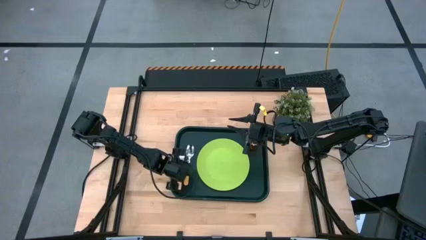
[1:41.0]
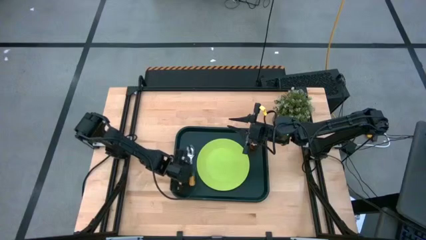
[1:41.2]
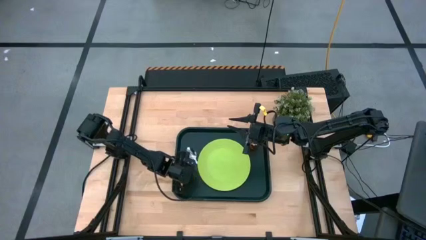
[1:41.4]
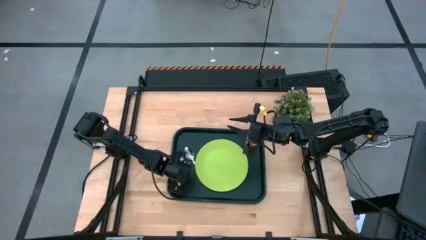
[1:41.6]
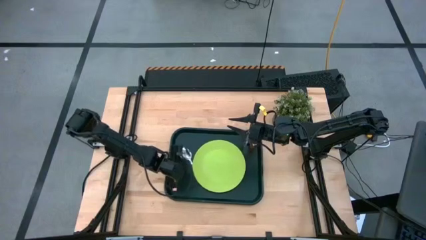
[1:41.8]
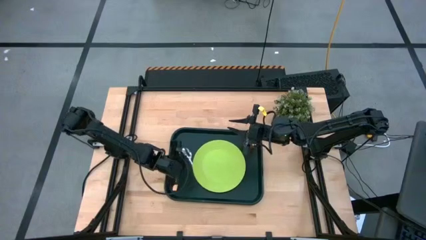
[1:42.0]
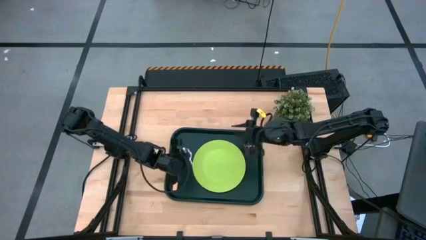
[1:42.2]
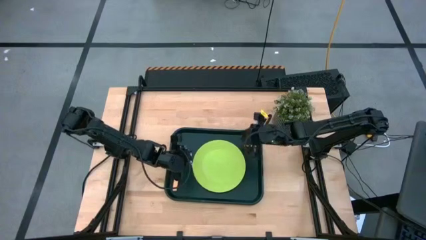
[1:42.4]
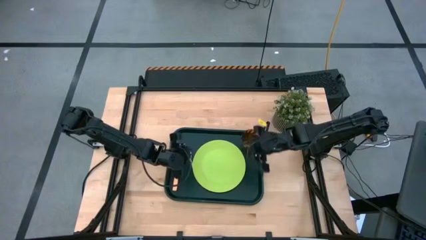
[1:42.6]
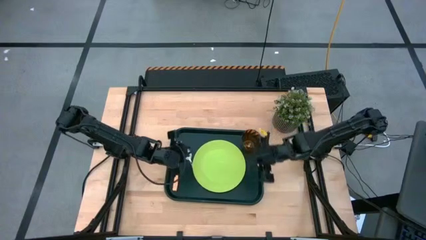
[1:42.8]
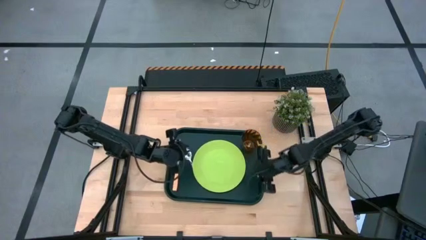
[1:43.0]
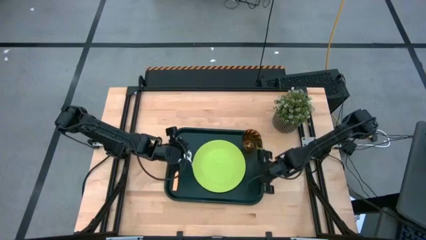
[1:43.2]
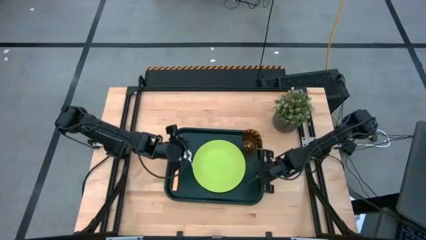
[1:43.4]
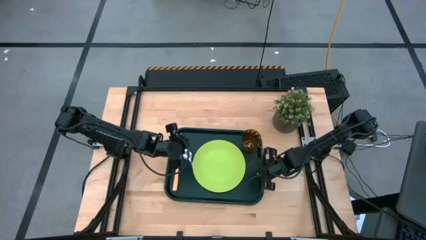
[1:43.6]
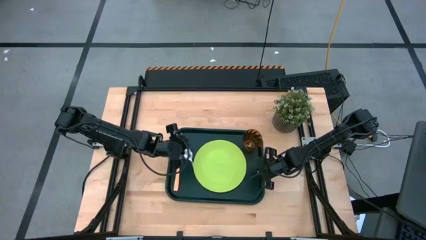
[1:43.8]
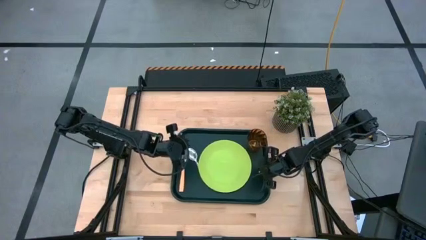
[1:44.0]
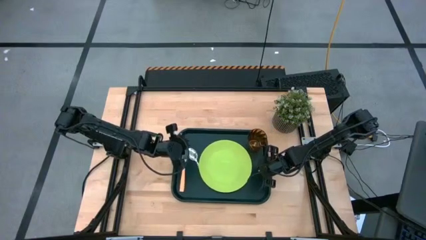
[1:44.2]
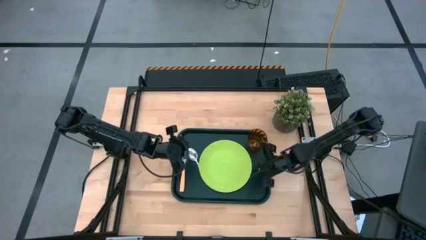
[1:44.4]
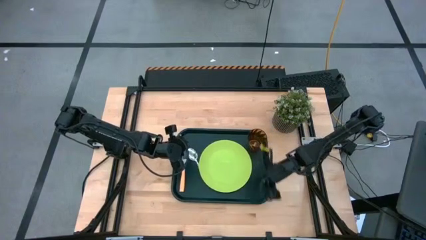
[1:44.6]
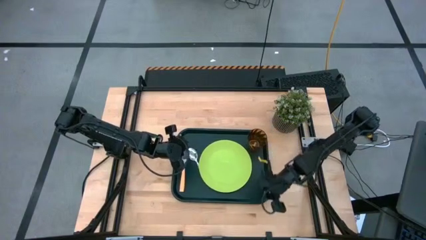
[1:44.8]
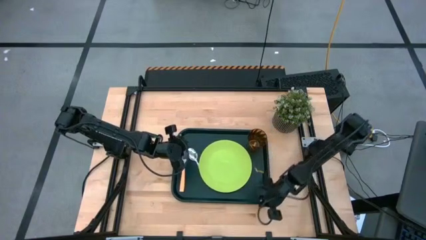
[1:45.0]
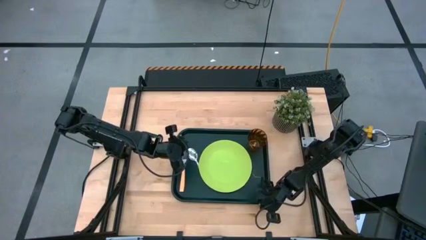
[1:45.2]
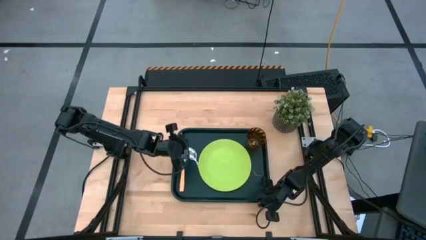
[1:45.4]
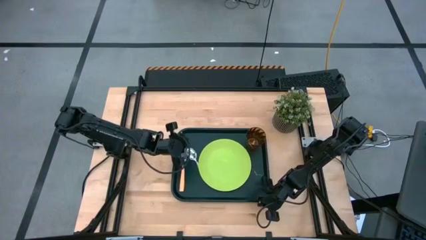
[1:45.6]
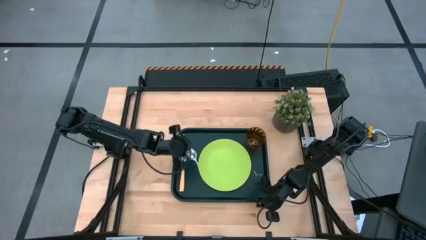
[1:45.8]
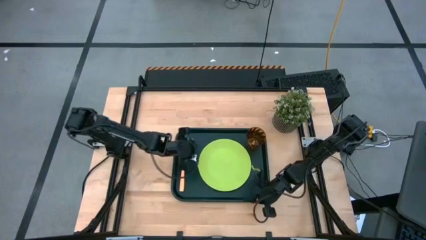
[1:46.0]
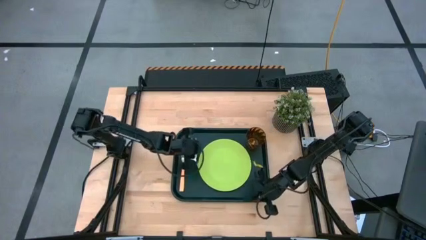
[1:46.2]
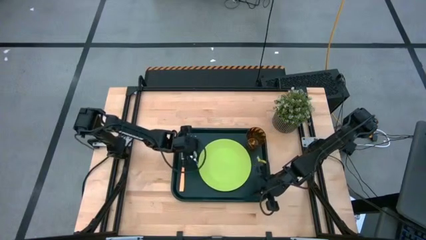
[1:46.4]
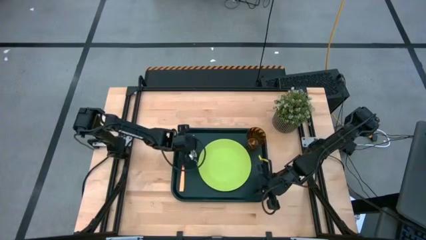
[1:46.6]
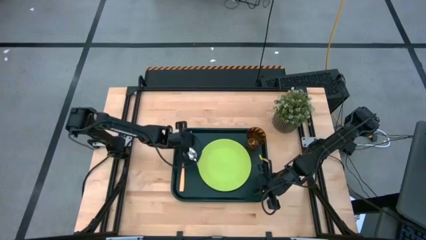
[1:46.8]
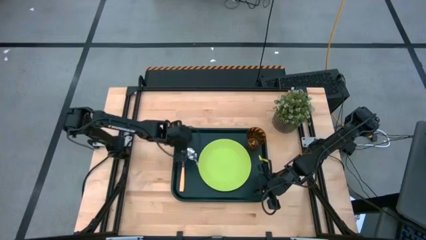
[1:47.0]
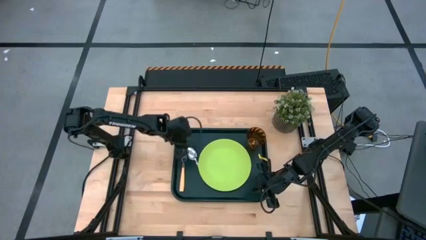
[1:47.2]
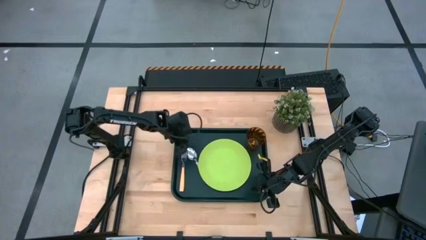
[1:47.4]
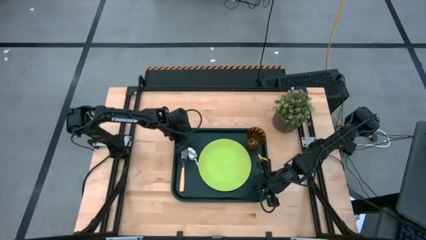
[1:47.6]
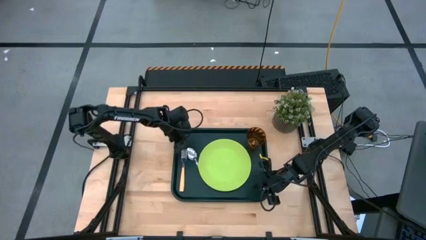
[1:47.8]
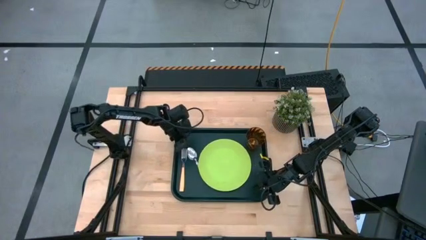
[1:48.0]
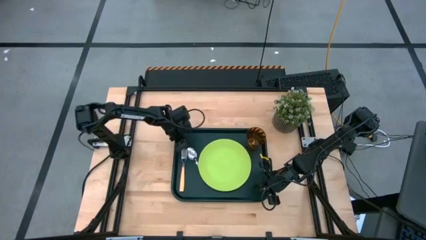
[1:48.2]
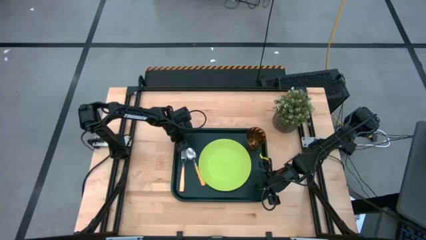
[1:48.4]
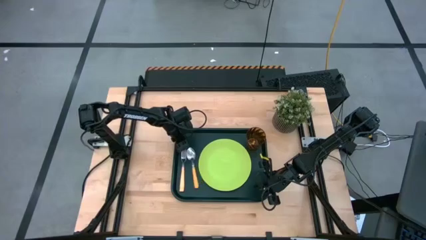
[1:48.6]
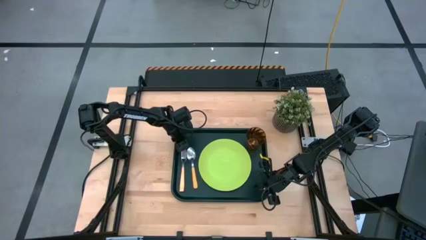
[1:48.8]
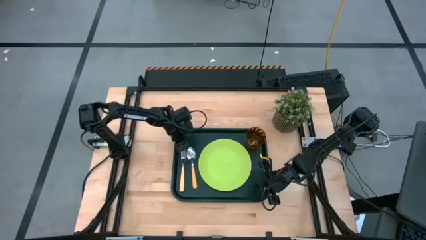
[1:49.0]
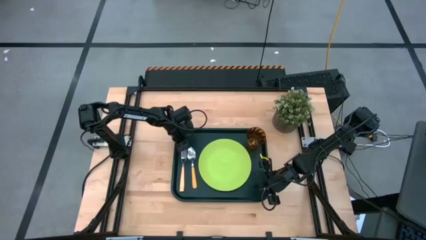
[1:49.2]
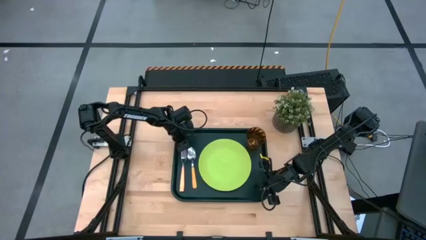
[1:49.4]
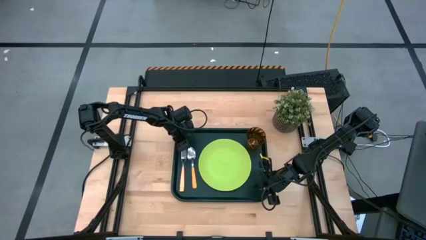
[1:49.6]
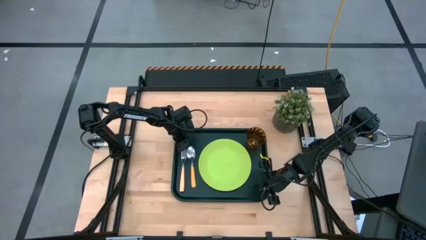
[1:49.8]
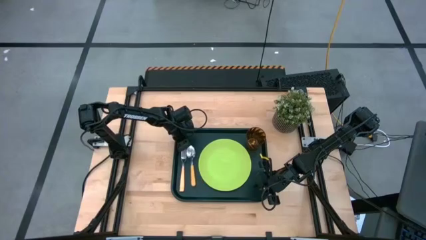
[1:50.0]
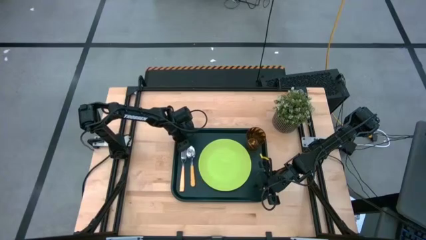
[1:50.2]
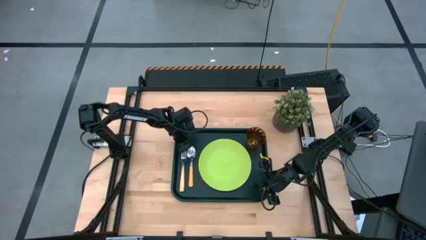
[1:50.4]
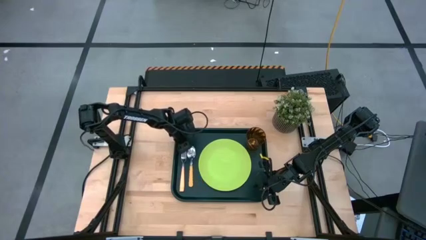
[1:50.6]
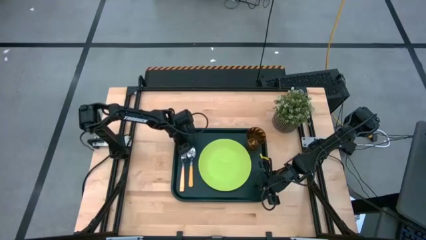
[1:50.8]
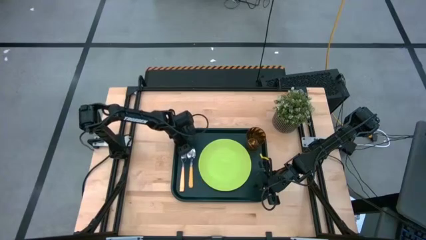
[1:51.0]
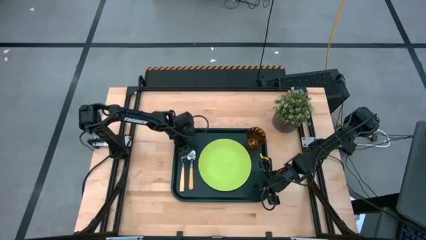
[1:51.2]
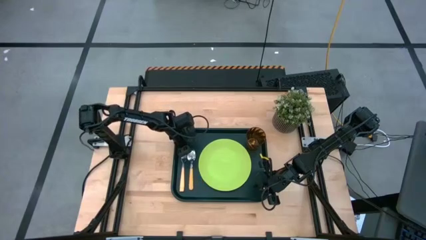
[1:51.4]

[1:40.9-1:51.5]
Task: Pick and place plate/cup/fork/spoon on tray
Adjust the orange spoon on the black tray

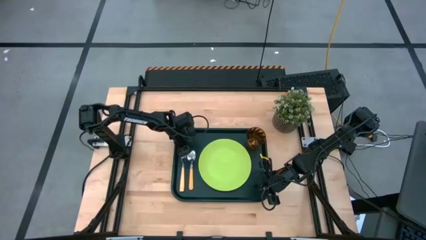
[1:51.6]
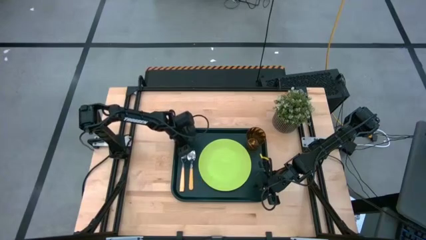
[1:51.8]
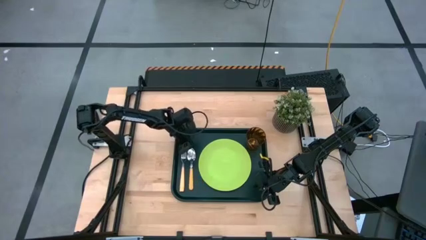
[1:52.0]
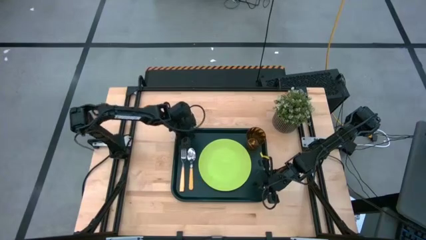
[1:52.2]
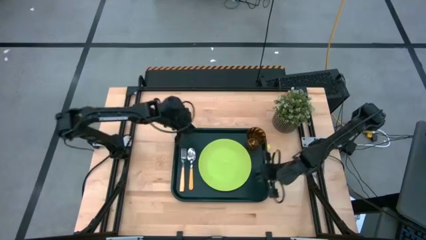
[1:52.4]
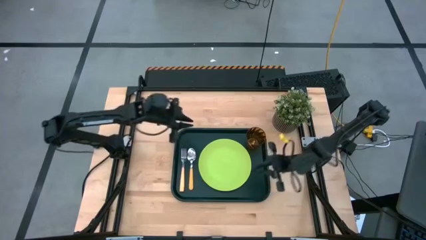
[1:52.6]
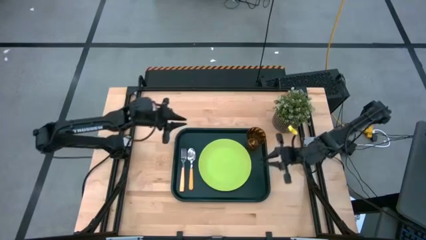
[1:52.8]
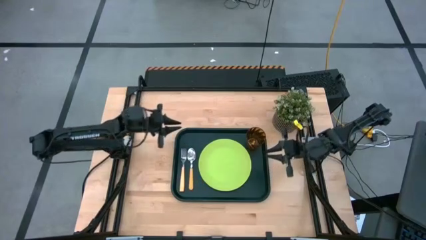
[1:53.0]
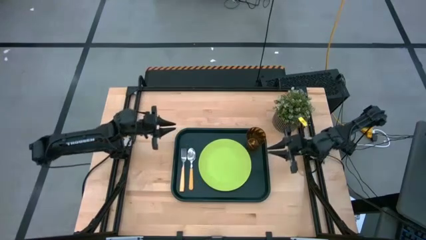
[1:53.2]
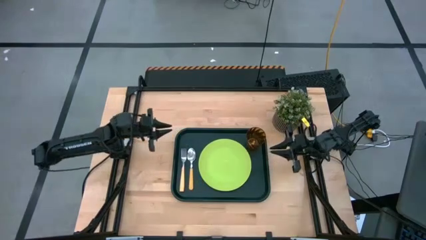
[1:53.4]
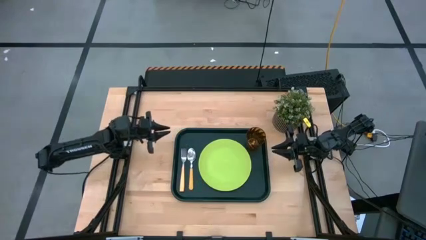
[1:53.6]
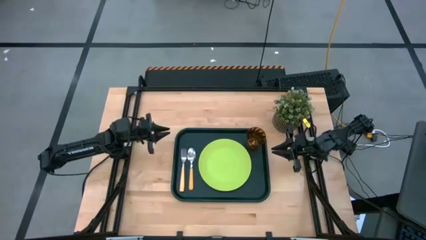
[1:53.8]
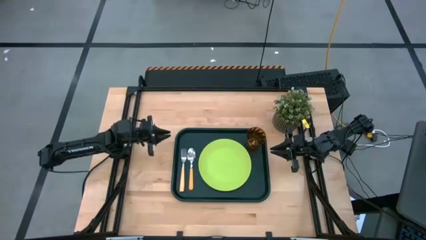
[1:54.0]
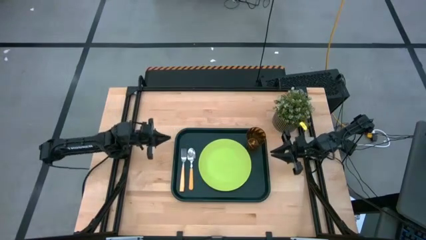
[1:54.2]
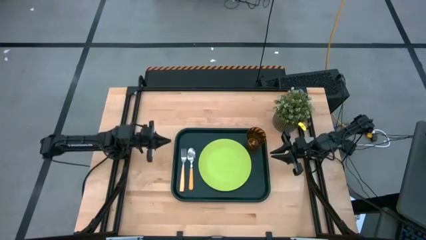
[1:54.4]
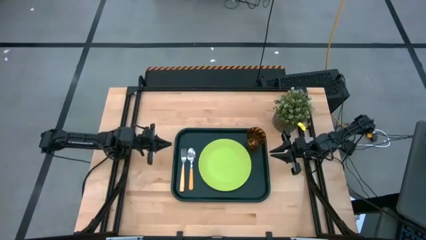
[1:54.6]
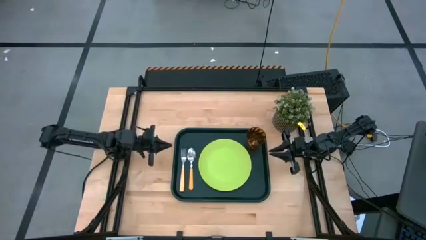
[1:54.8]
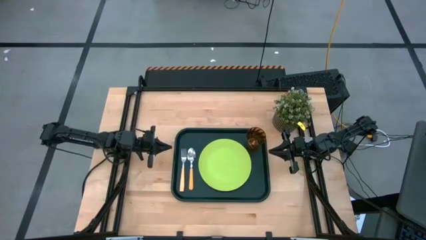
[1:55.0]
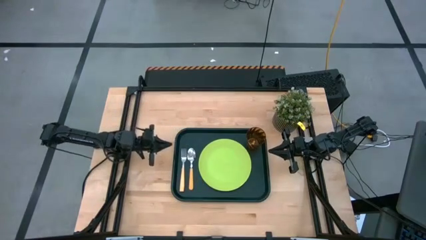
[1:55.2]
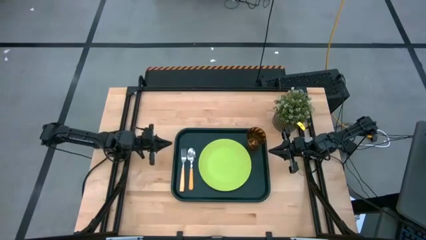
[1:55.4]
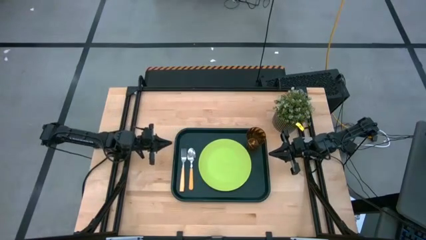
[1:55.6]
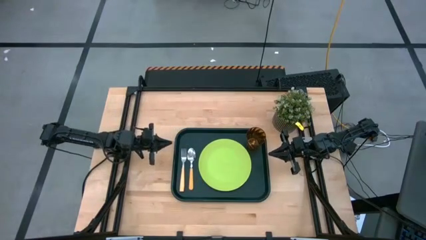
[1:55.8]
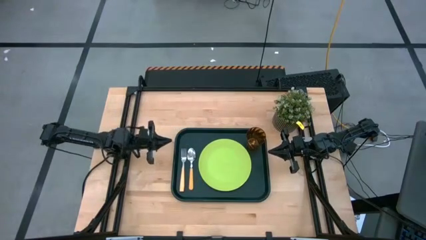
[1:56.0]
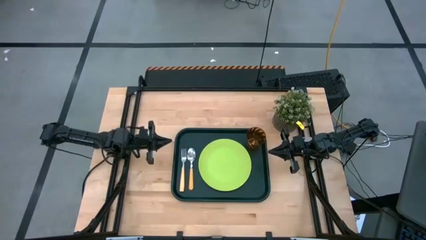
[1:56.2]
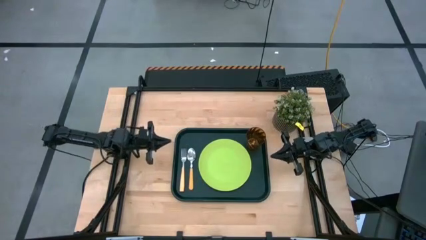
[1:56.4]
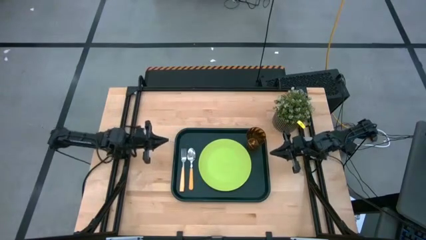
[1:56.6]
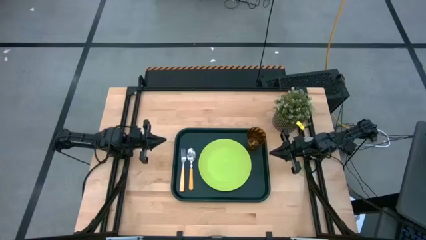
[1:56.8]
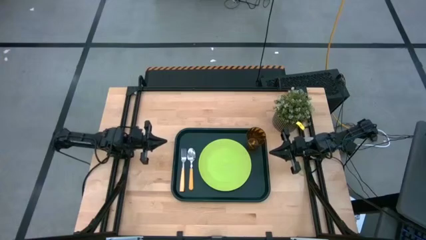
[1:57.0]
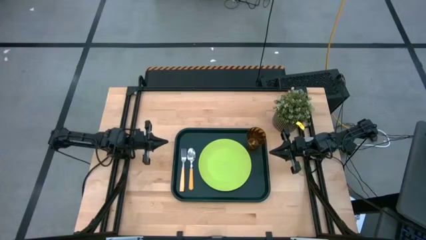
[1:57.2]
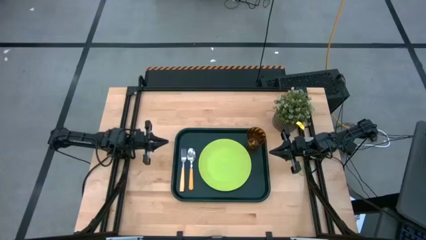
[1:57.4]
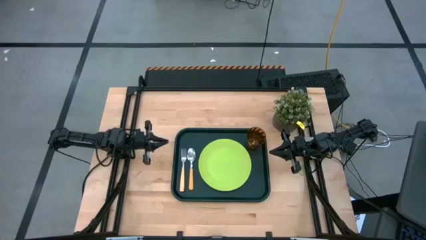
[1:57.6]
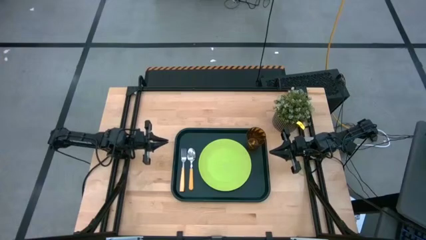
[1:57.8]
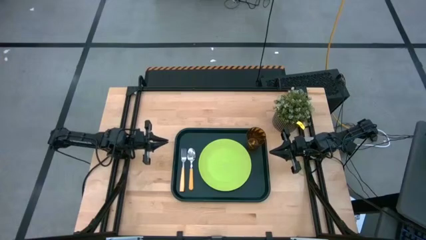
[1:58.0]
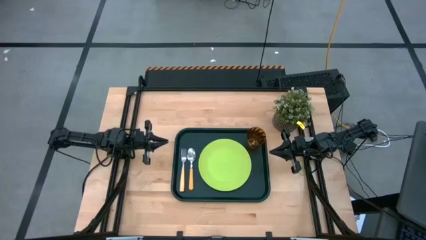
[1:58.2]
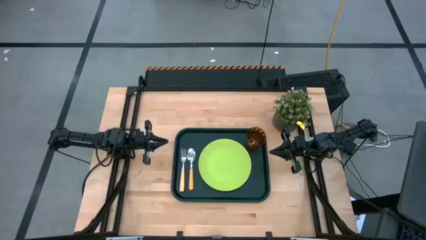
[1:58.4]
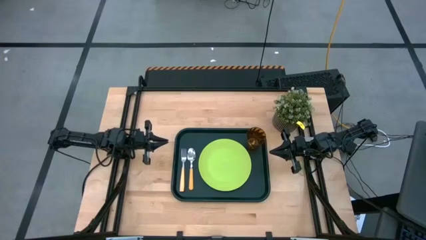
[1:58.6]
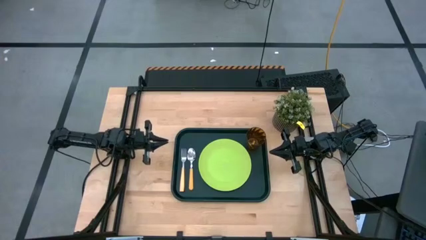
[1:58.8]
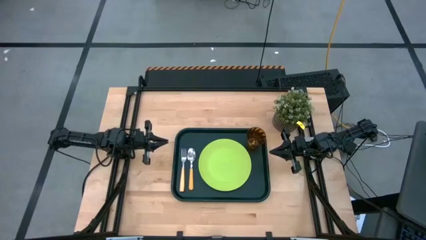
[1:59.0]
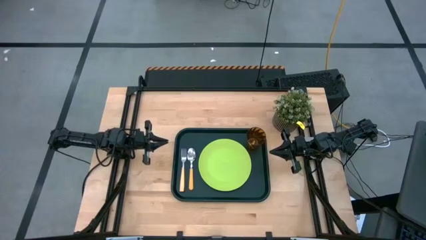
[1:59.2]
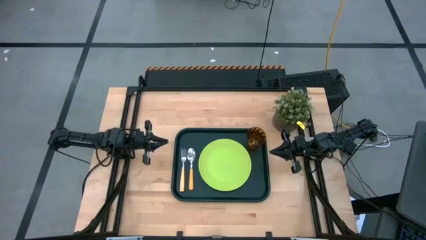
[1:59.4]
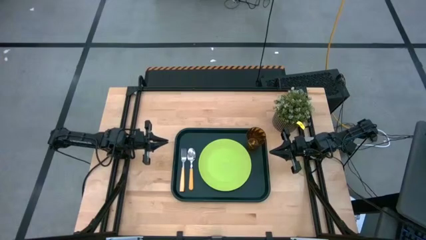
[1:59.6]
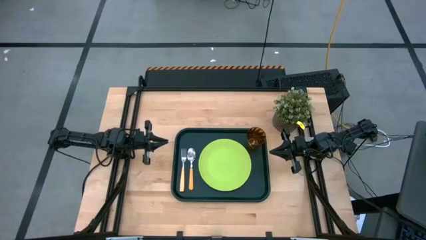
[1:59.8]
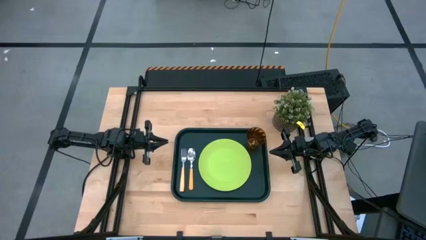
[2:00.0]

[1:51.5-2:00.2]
Return to Home Position
